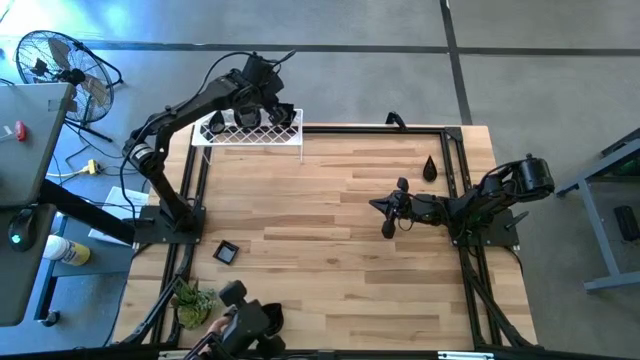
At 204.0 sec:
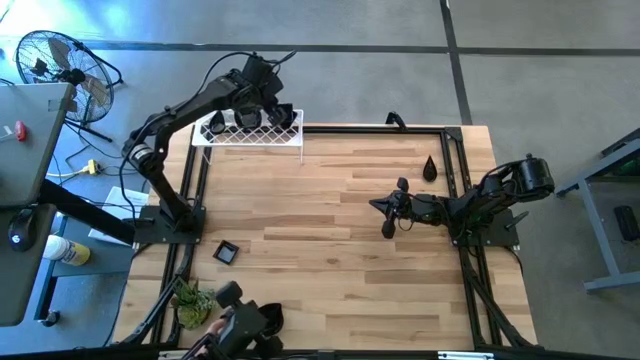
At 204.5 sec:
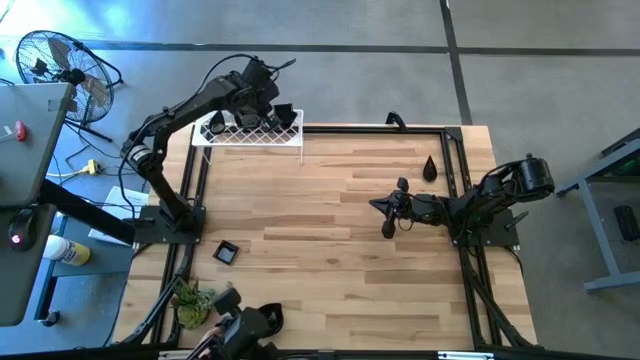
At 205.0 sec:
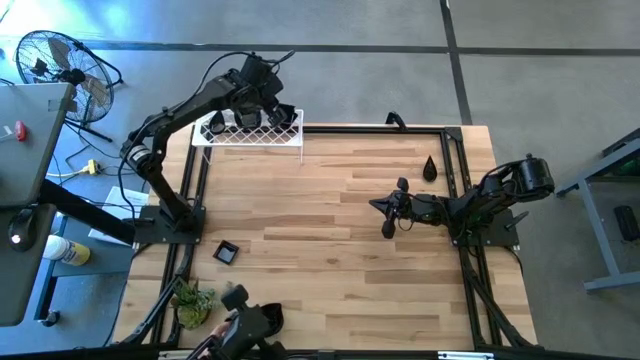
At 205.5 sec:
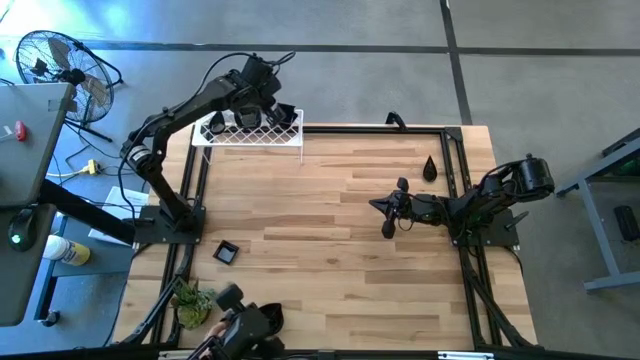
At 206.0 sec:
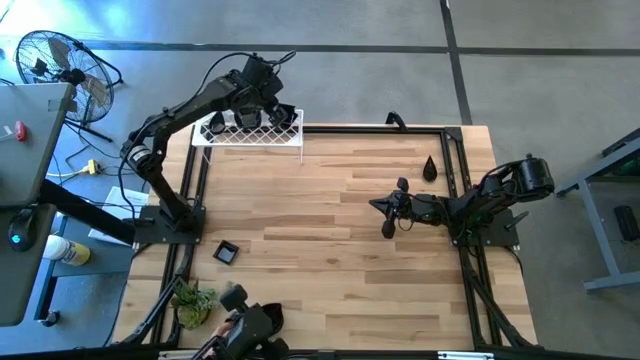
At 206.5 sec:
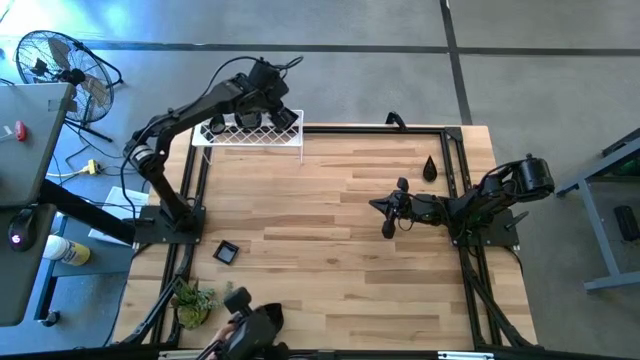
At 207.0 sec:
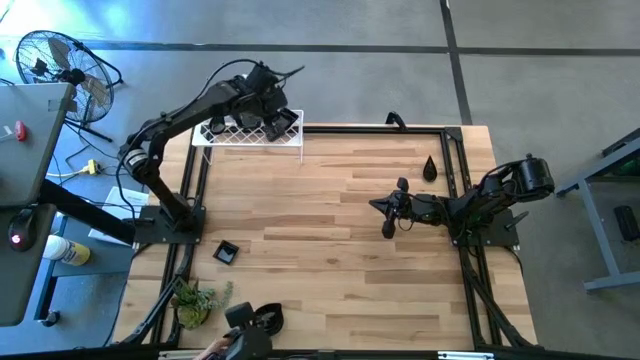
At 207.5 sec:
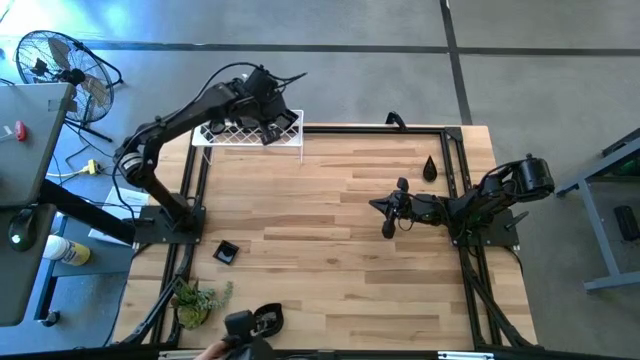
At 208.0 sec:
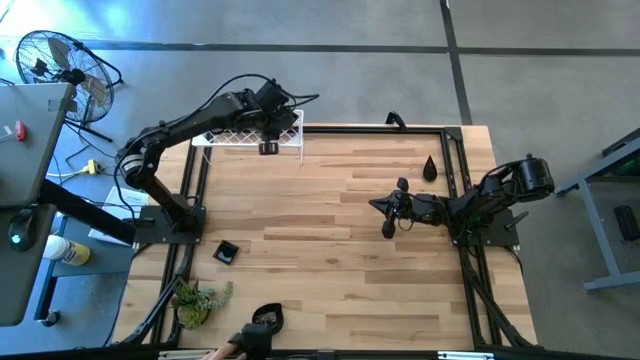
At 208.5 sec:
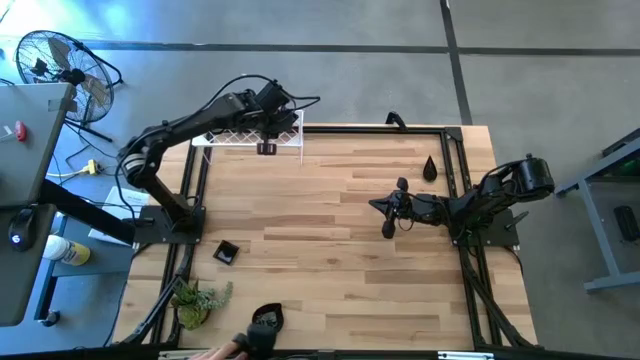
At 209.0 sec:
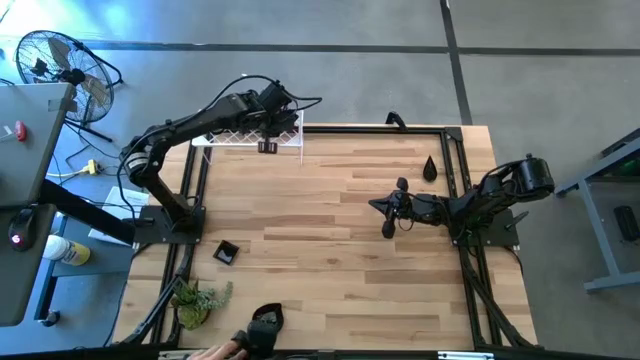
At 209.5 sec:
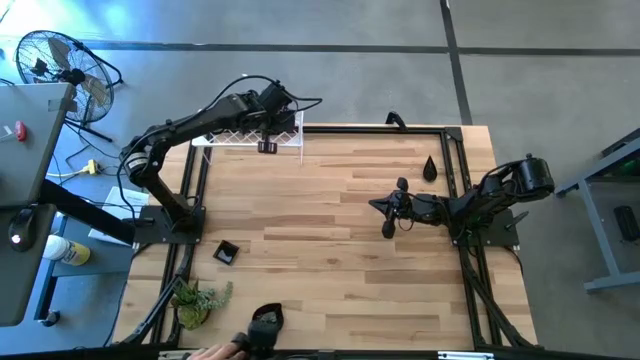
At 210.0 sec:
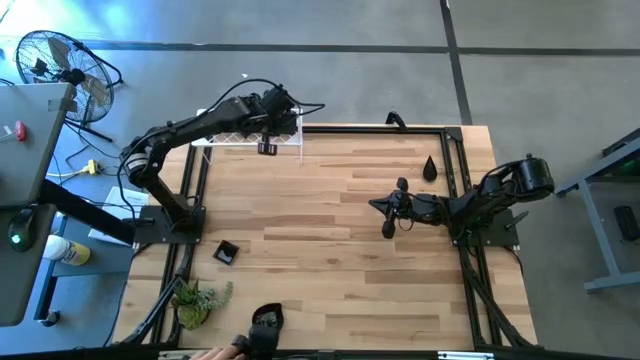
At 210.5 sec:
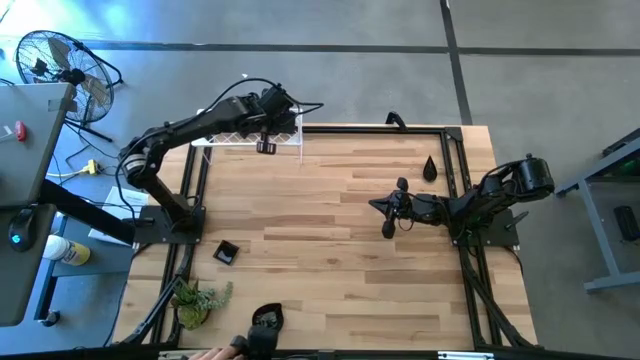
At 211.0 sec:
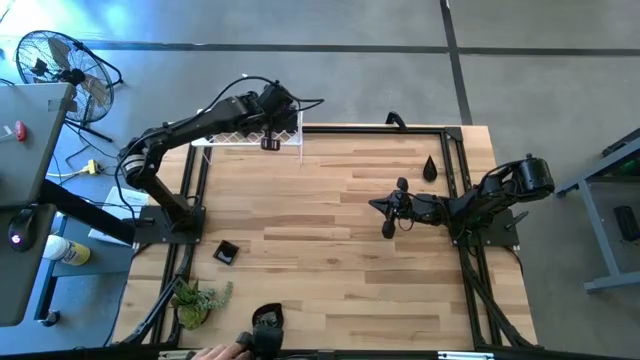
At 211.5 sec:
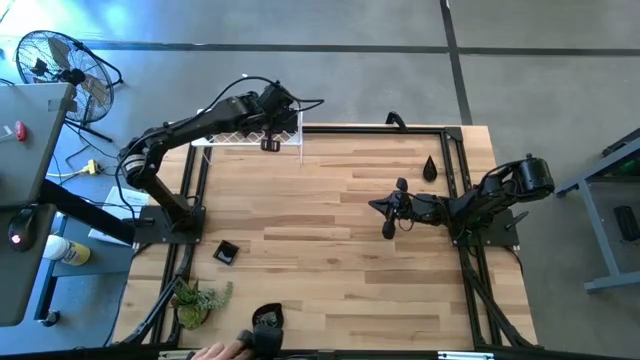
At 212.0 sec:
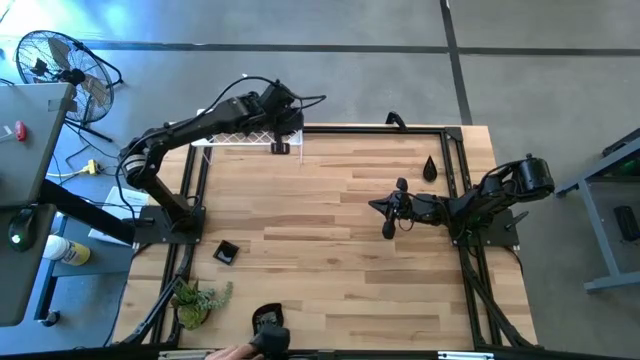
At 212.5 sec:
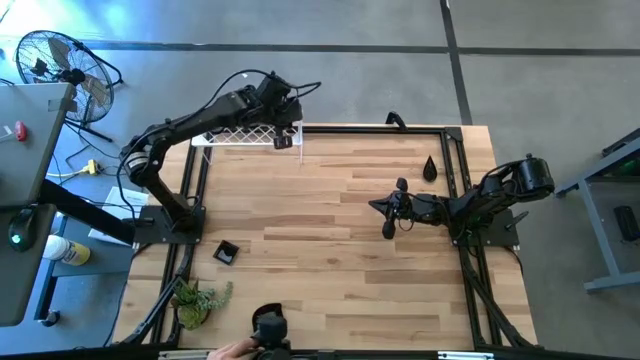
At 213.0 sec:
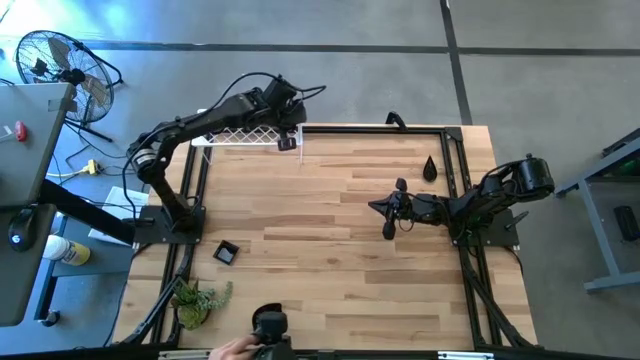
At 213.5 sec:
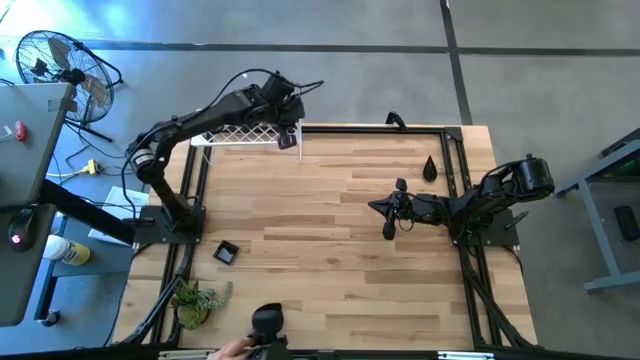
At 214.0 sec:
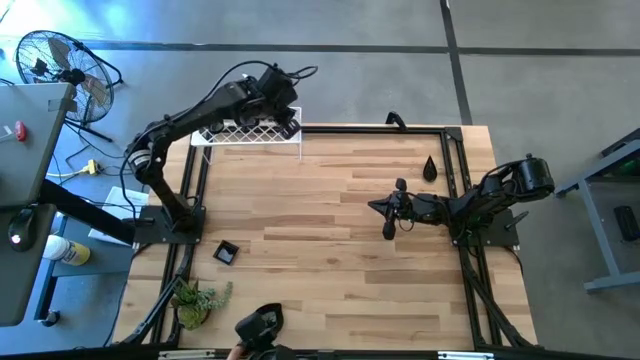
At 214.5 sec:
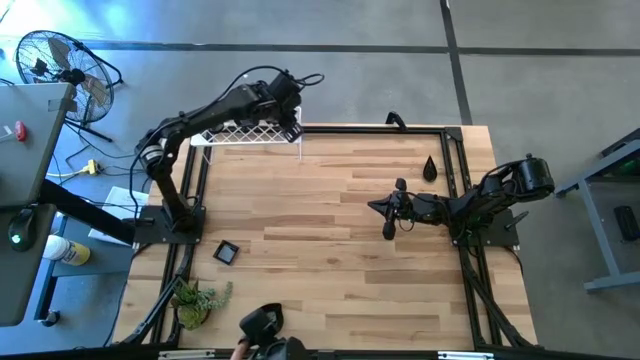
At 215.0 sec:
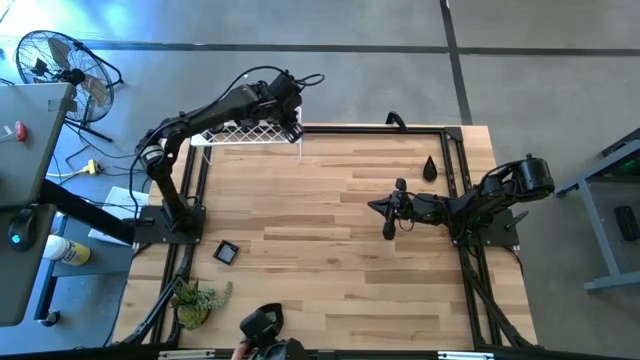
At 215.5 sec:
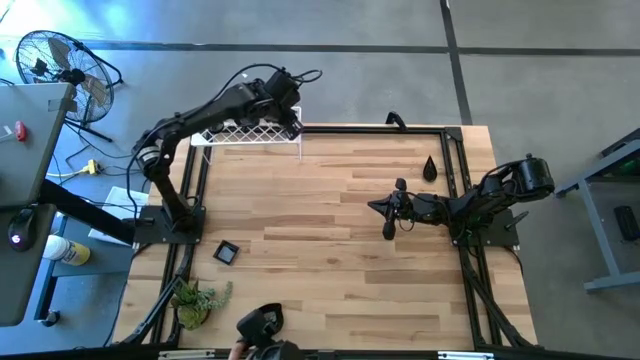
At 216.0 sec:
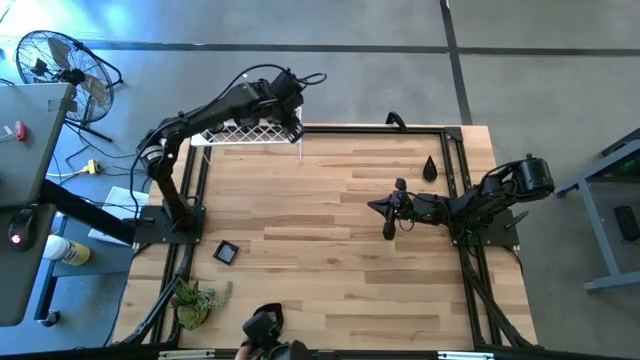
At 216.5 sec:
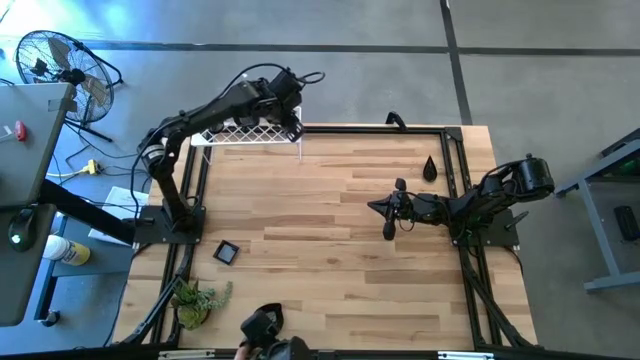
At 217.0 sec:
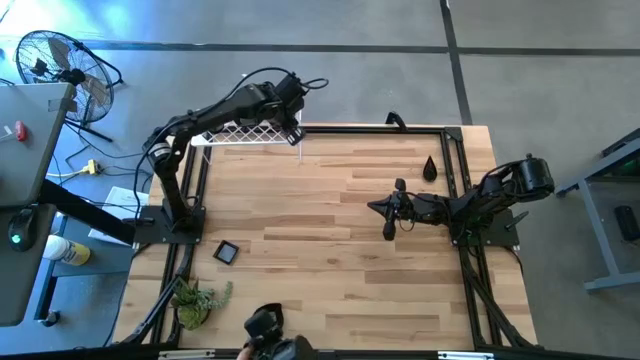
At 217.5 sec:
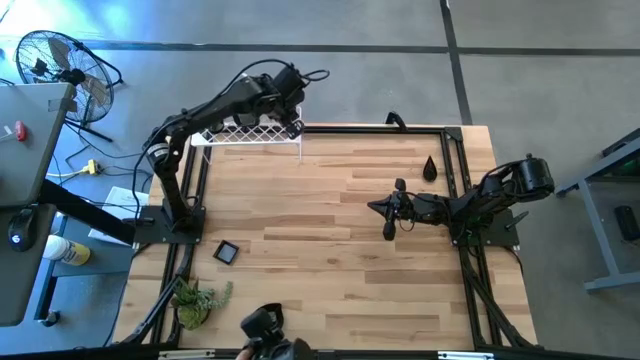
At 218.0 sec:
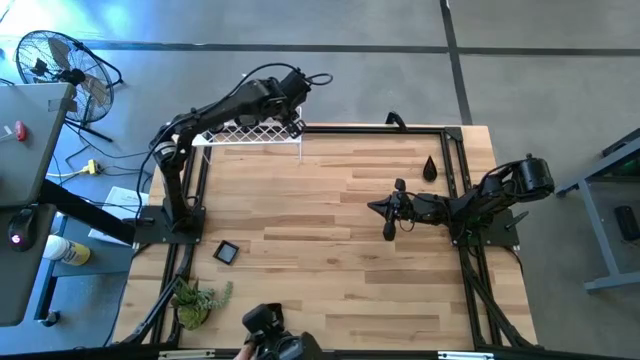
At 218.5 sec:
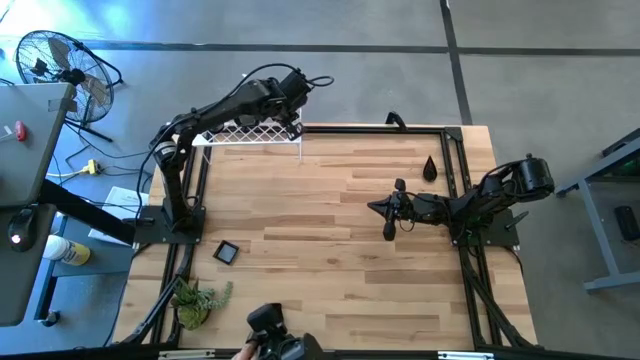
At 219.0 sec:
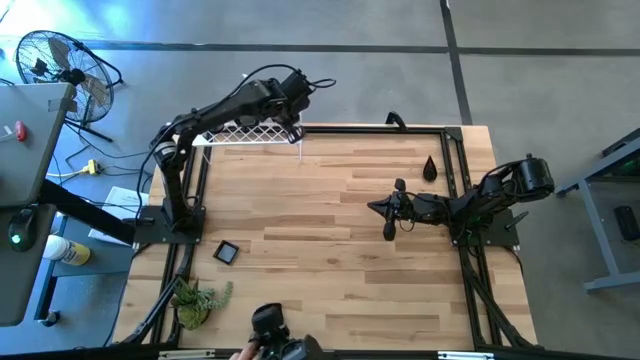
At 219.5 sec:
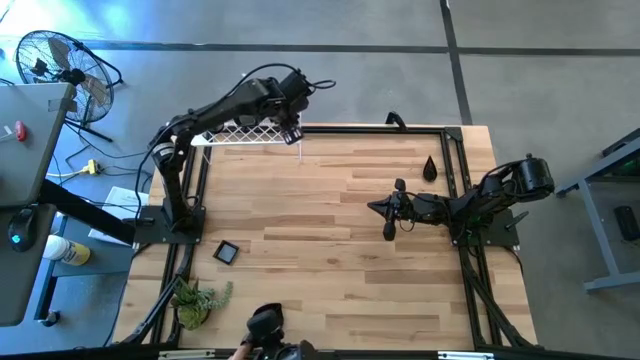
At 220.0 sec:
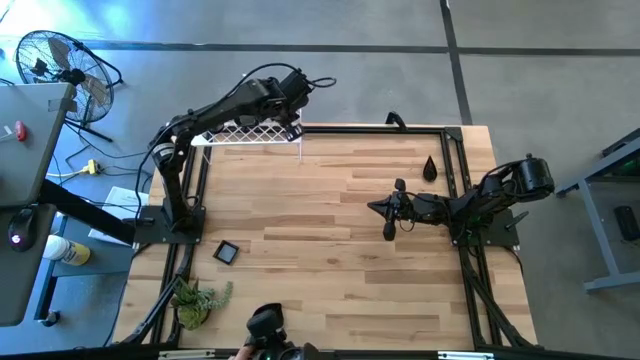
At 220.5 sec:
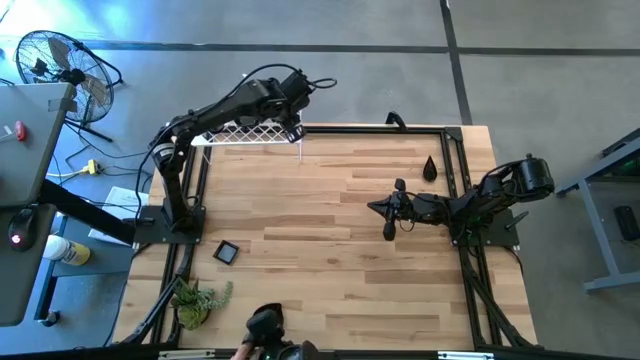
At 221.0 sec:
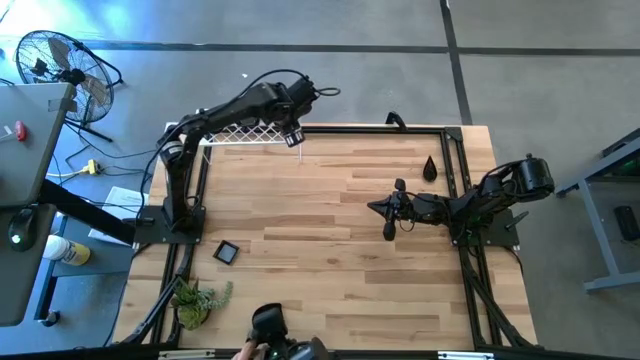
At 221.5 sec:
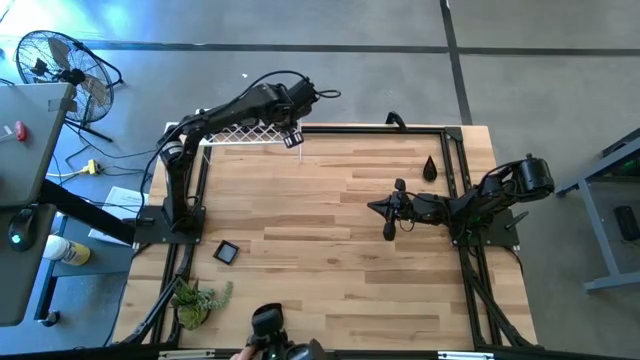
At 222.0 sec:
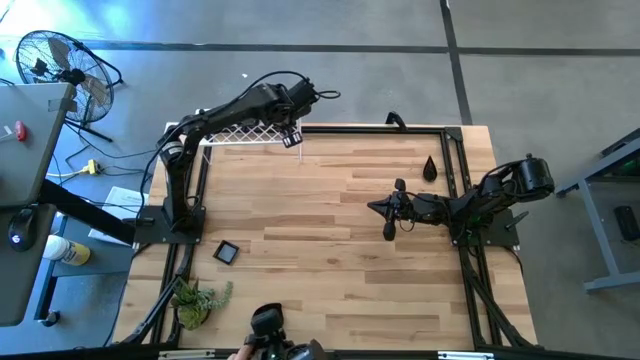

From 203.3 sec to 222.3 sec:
Task: Pick & Place Mini shaped plates
Stack the top square plate on top of the square plates on the shelf

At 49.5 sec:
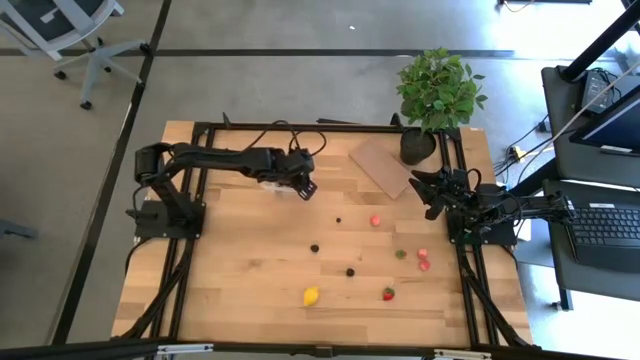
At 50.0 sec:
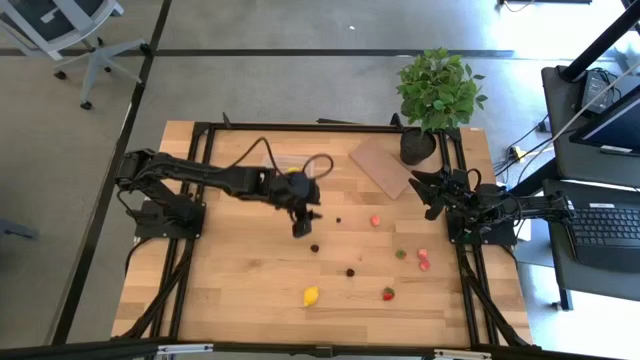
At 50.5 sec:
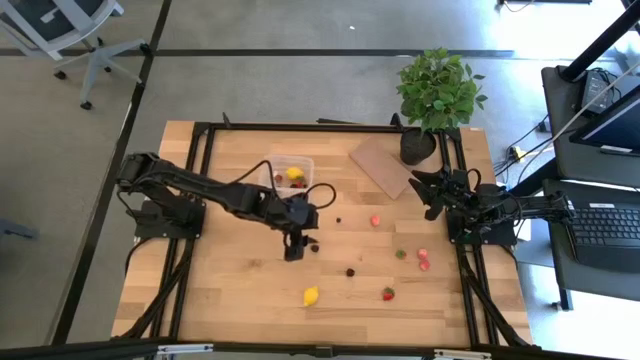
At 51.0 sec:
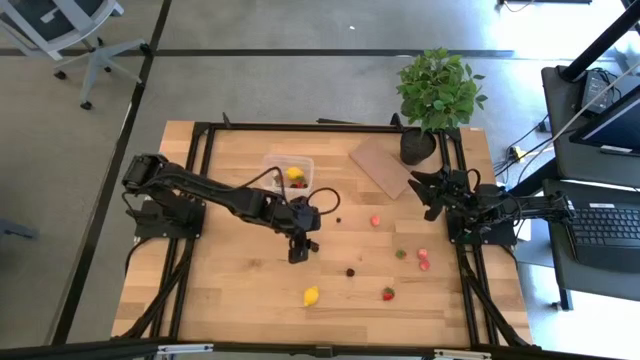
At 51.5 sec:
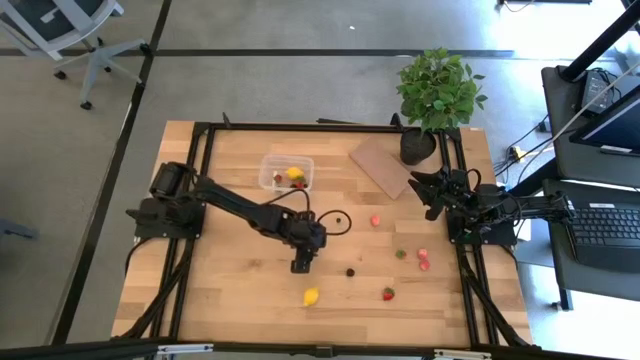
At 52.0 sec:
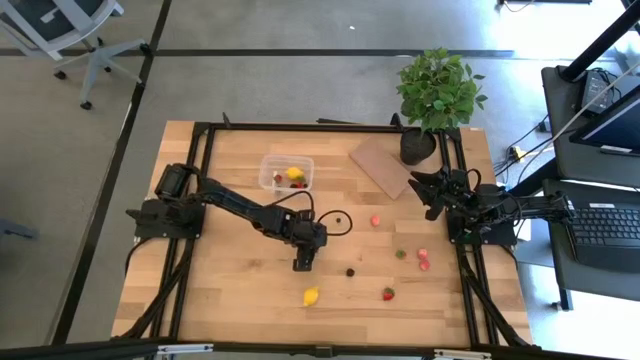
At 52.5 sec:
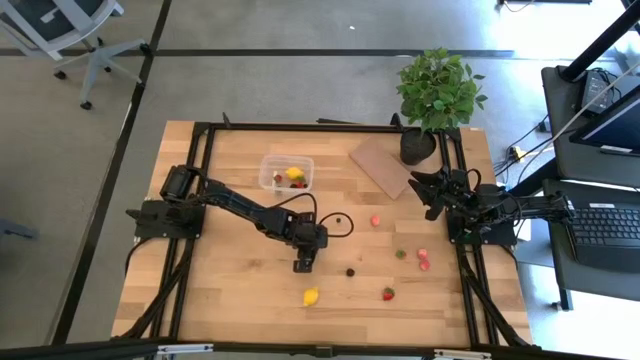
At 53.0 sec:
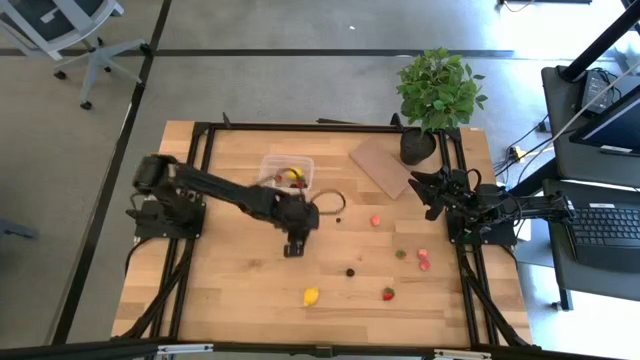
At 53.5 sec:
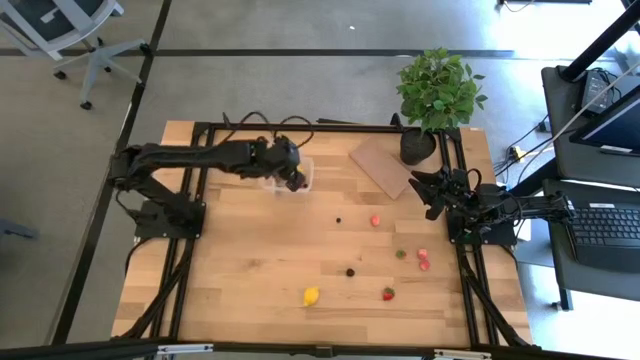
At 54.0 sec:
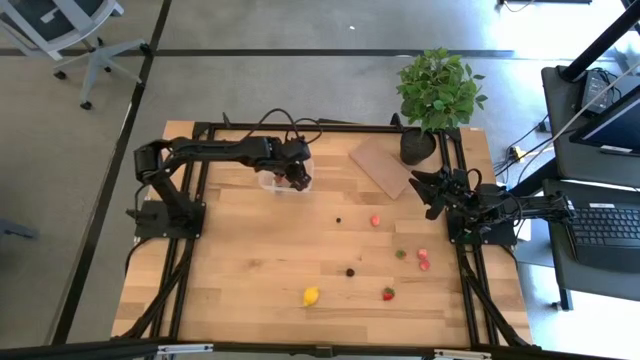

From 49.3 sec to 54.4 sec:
Task: Pick and placing Produce into tupperware
Put the blackberry into the transparent bin
